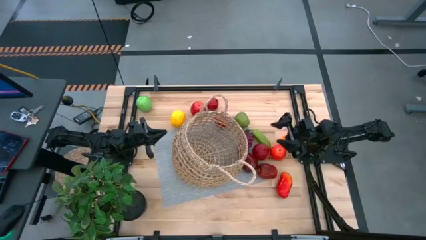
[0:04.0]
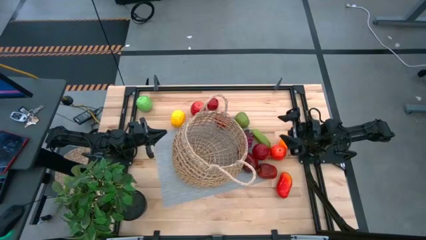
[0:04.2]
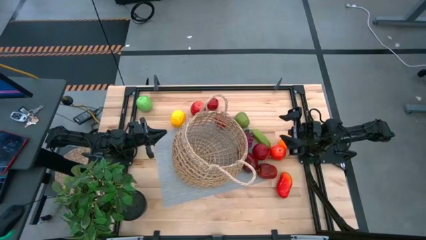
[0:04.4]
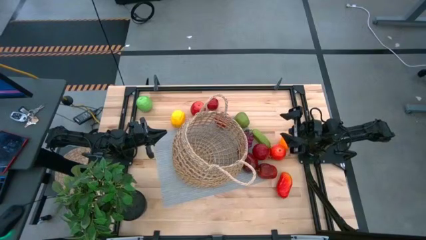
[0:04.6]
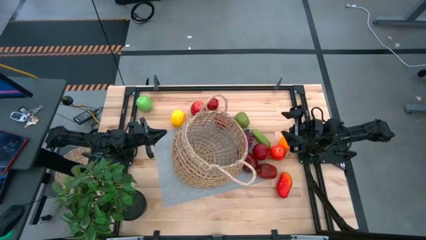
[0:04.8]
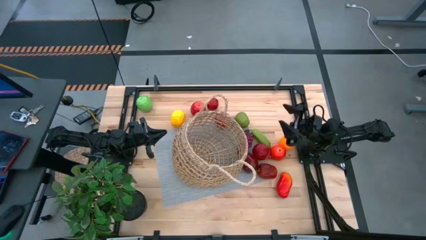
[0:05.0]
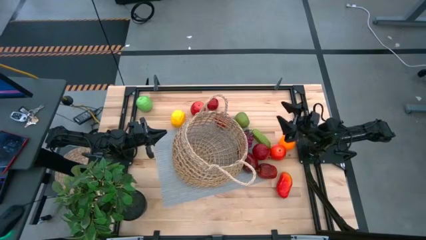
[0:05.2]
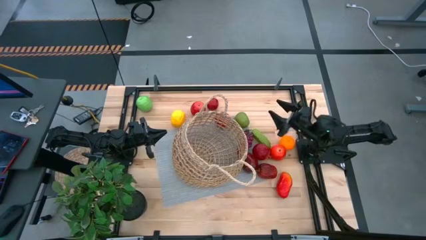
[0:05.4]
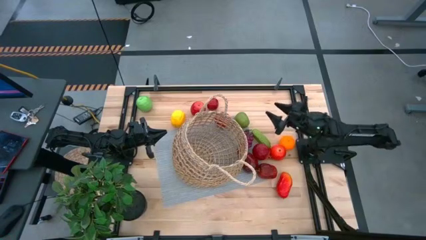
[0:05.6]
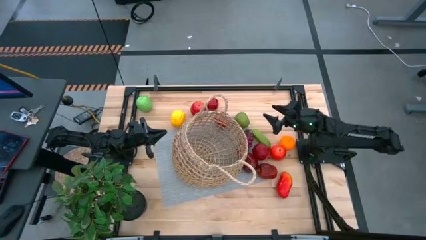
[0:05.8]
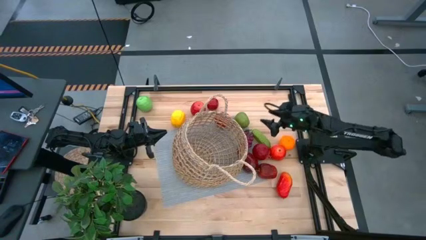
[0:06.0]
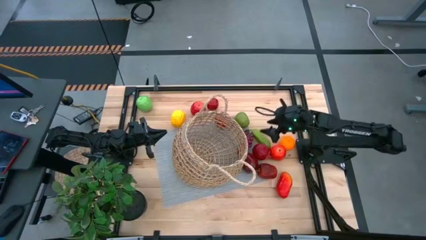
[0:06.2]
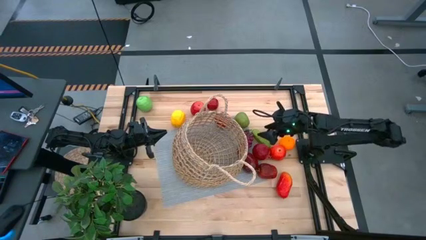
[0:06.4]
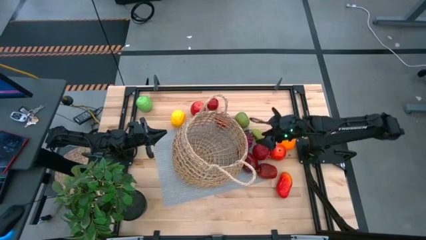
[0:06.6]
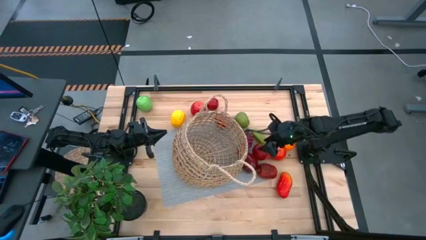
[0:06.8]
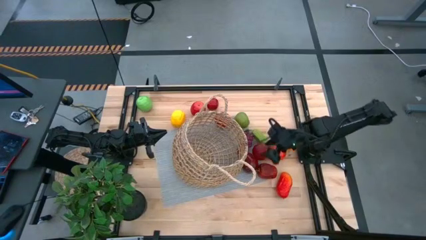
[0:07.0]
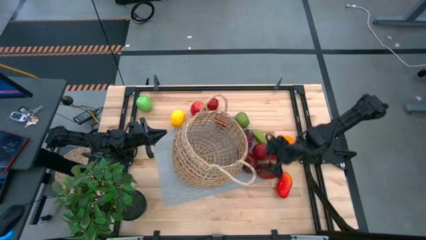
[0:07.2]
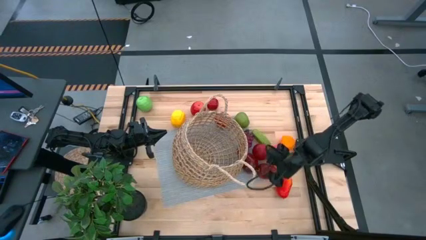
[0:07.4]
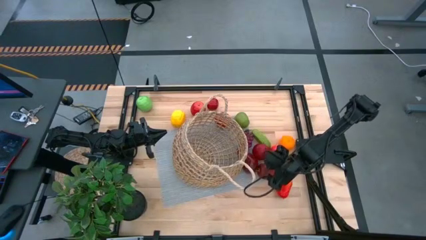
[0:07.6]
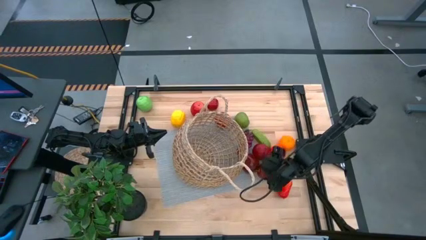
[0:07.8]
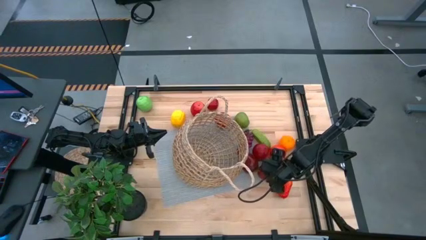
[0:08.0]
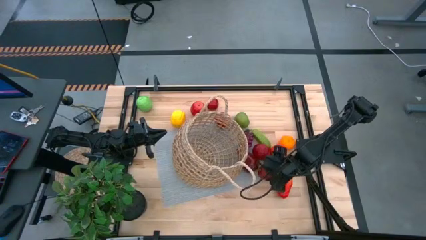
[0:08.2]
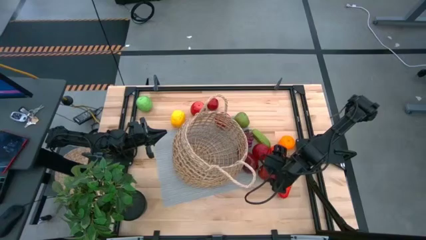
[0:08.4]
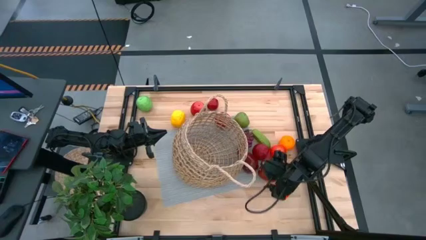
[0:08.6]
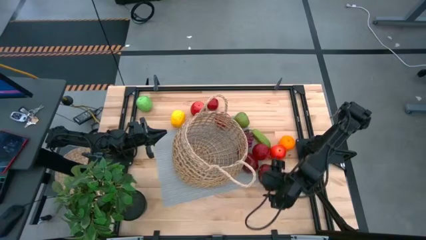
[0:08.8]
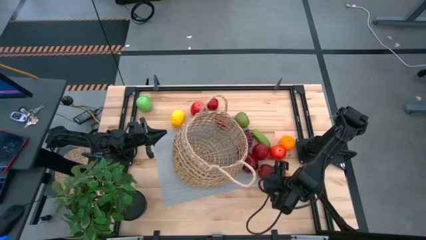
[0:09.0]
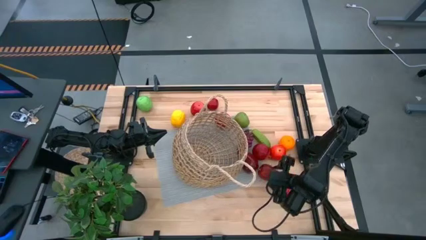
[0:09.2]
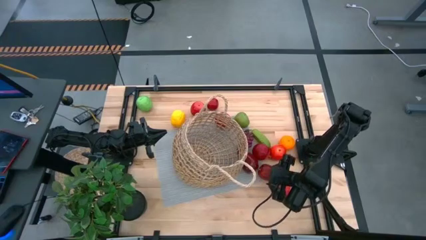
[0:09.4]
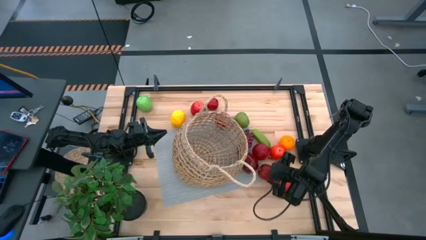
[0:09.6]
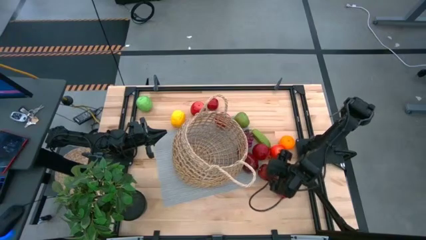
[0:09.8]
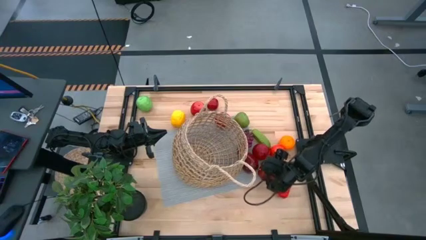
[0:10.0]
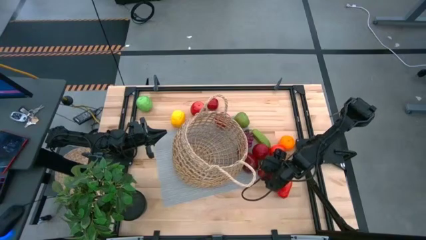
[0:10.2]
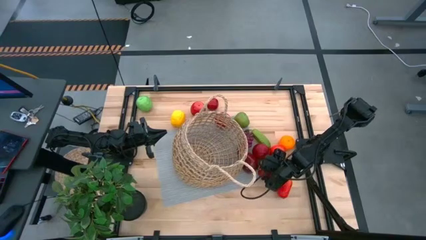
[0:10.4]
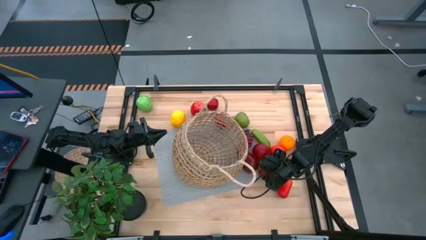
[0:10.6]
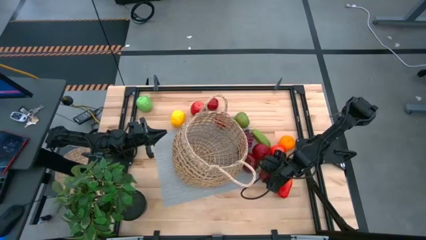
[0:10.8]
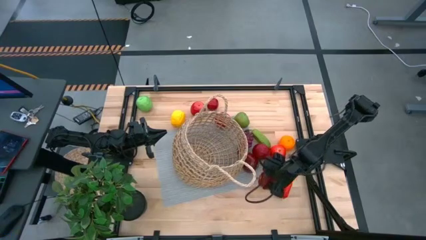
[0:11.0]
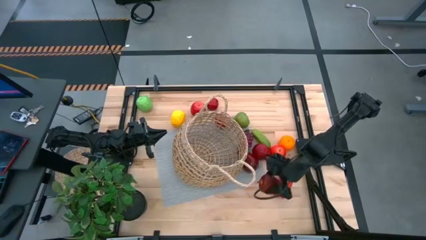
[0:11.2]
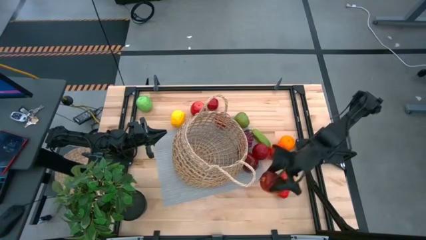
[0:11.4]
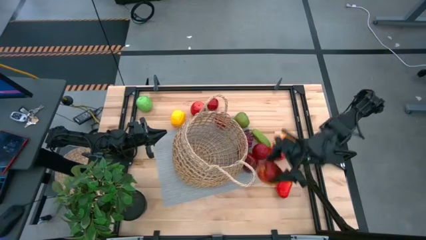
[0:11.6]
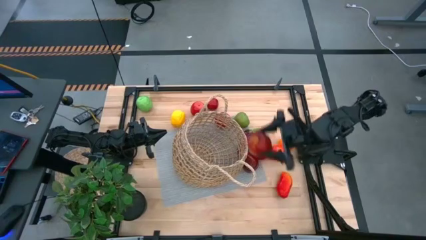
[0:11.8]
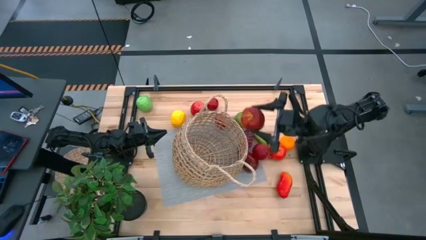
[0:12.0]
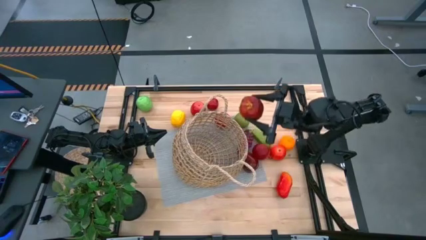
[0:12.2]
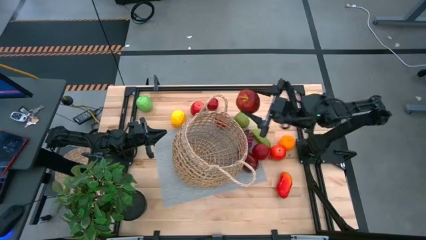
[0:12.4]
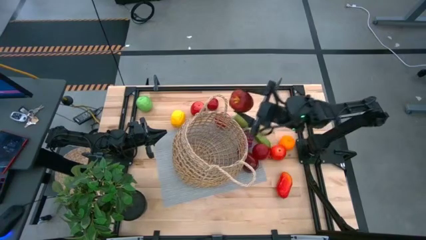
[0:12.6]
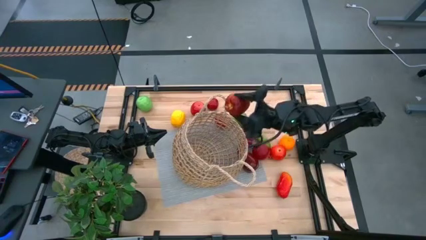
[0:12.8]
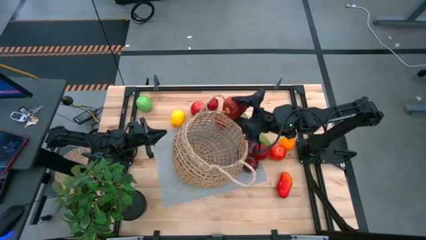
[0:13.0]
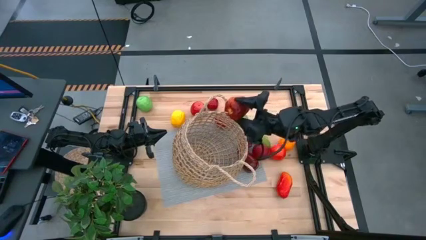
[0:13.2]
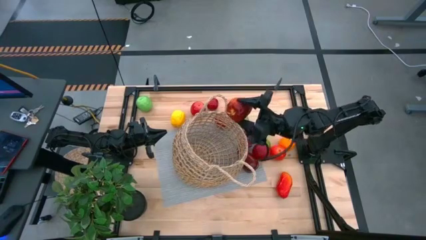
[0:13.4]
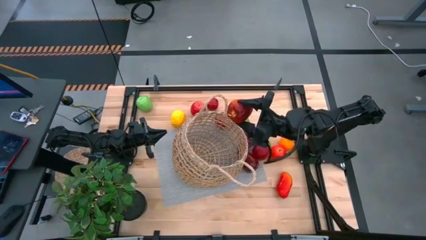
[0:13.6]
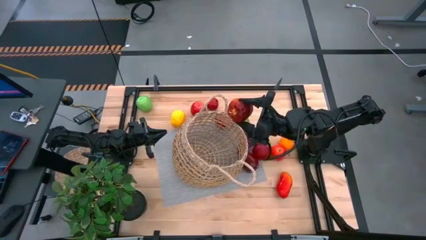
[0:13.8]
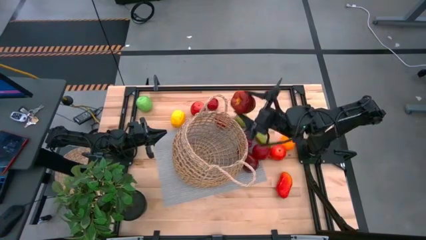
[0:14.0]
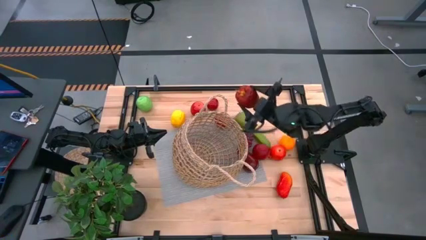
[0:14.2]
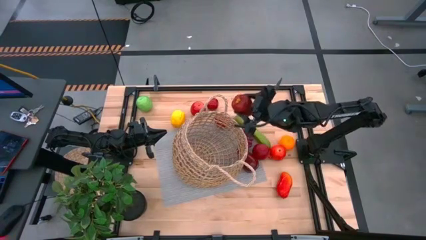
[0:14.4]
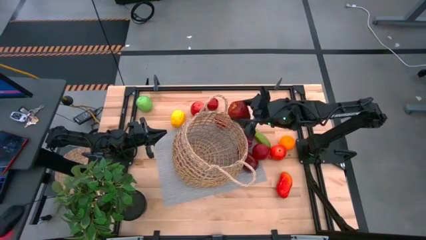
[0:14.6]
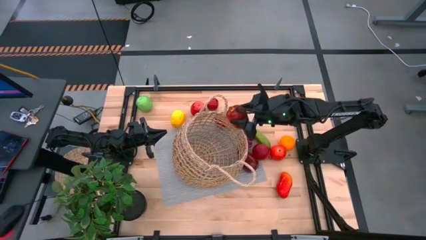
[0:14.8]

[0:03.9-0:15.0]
Task: Build produce basket
Put the red apple into the basket

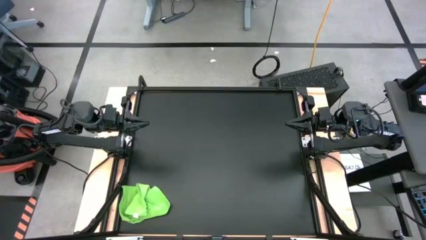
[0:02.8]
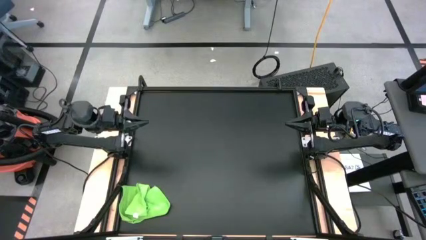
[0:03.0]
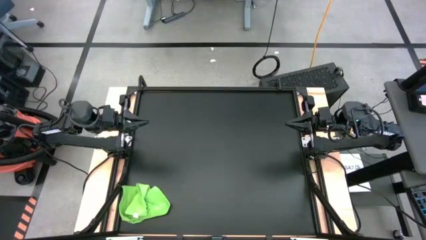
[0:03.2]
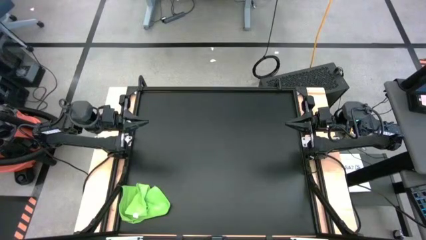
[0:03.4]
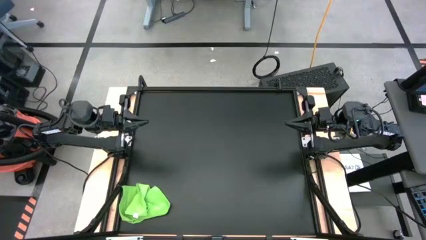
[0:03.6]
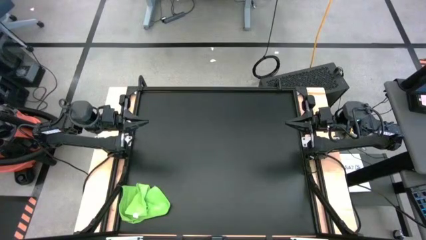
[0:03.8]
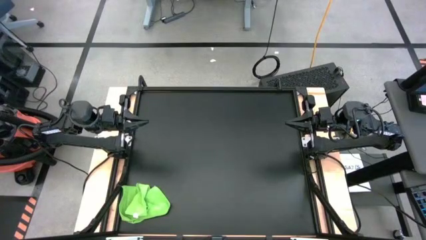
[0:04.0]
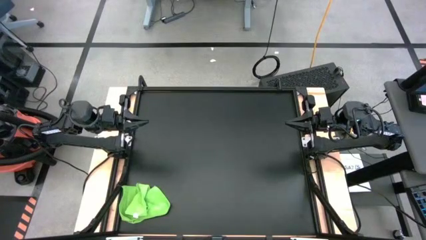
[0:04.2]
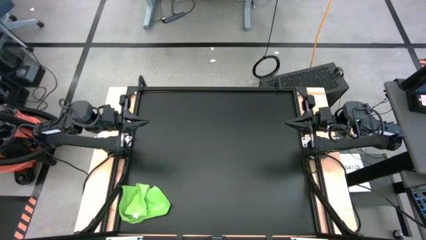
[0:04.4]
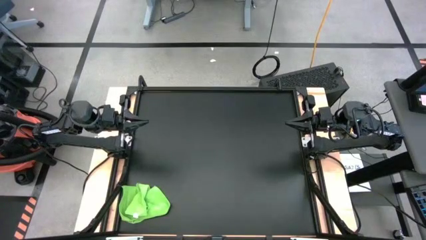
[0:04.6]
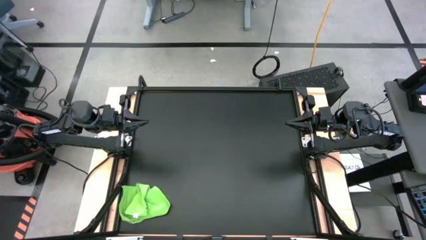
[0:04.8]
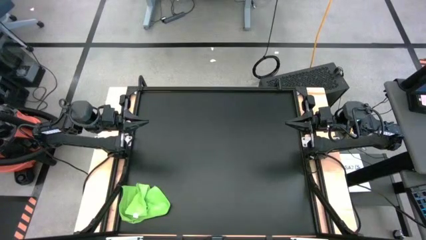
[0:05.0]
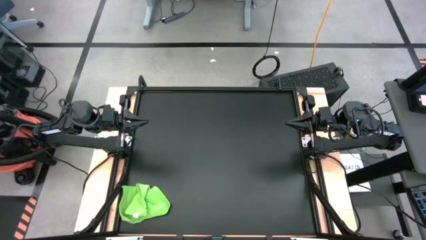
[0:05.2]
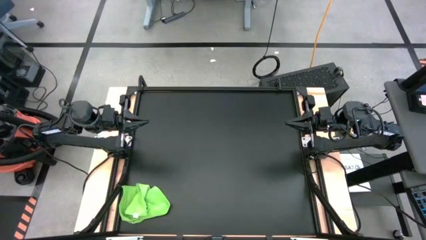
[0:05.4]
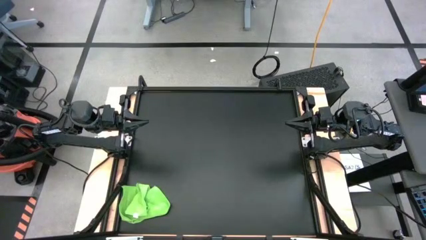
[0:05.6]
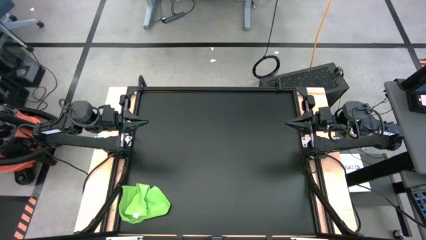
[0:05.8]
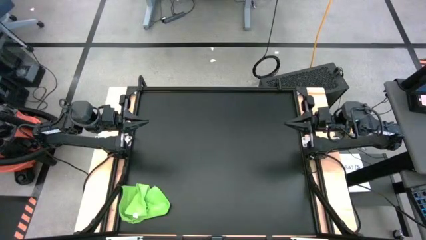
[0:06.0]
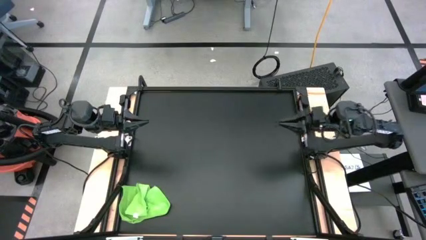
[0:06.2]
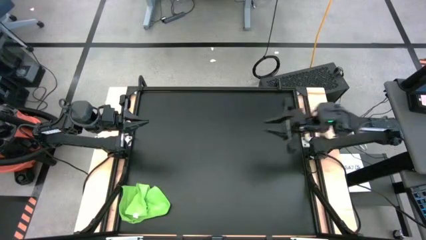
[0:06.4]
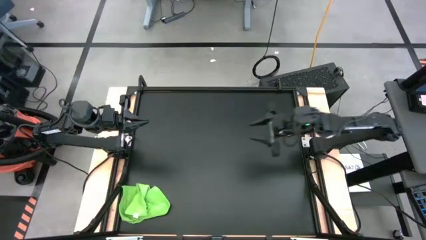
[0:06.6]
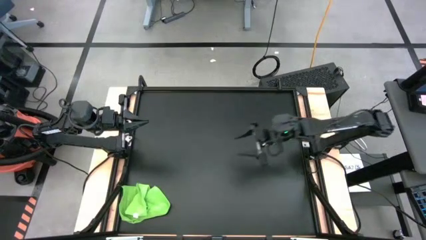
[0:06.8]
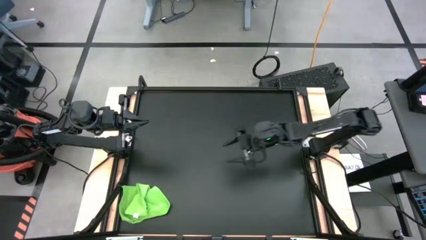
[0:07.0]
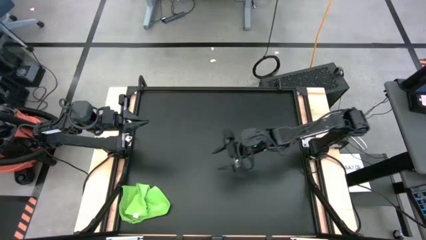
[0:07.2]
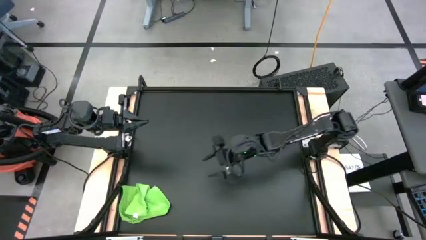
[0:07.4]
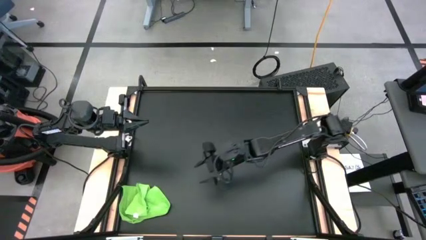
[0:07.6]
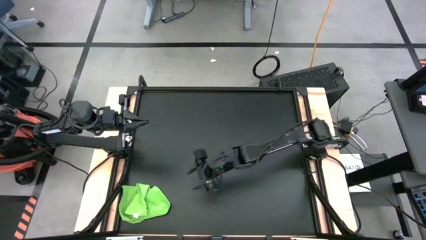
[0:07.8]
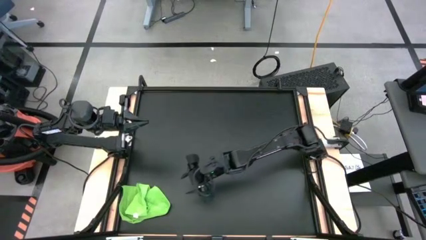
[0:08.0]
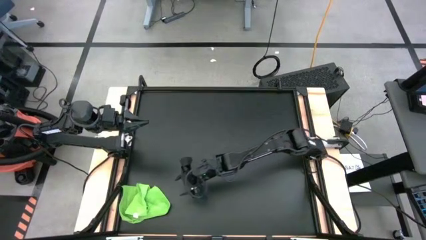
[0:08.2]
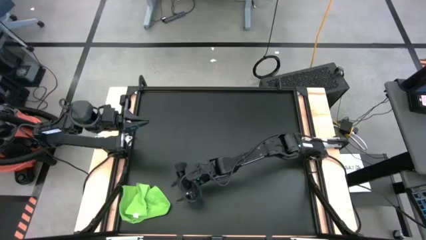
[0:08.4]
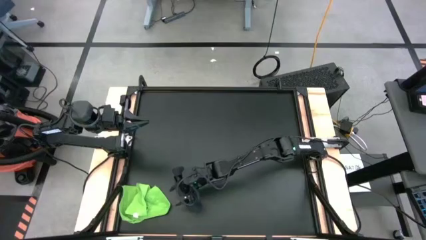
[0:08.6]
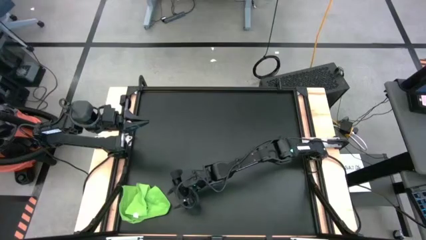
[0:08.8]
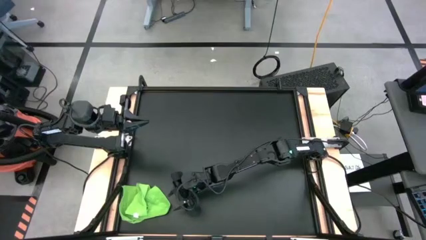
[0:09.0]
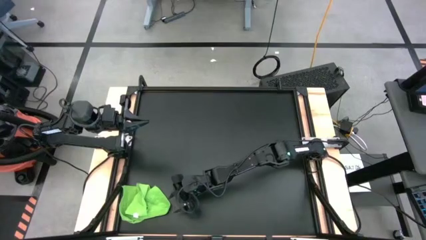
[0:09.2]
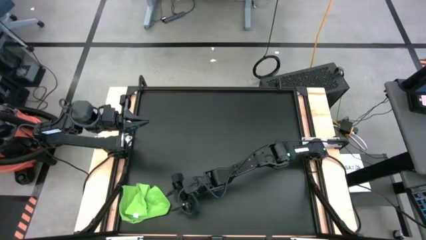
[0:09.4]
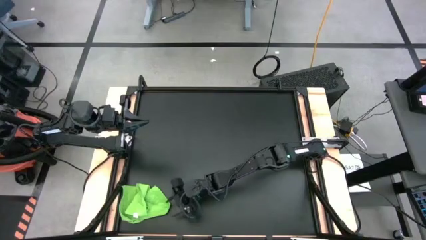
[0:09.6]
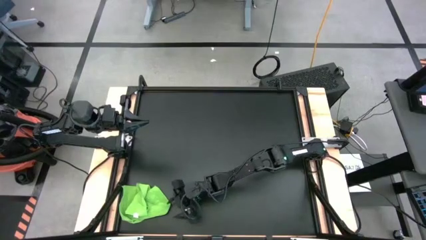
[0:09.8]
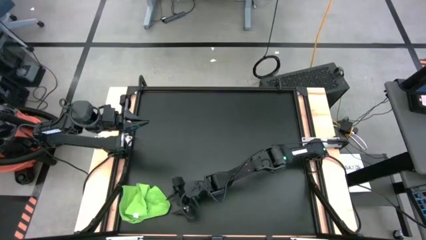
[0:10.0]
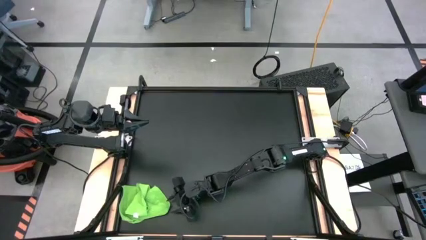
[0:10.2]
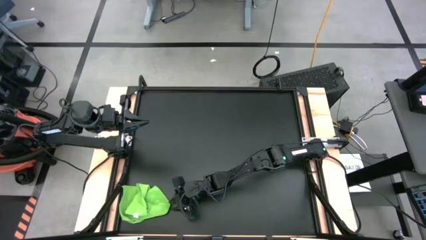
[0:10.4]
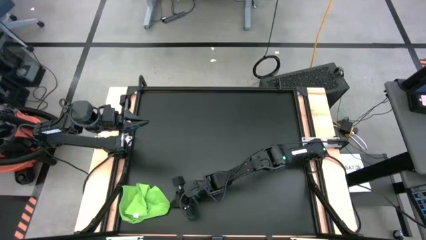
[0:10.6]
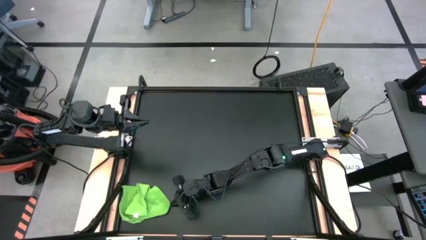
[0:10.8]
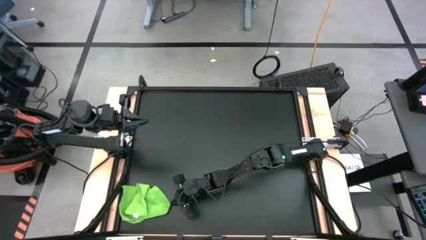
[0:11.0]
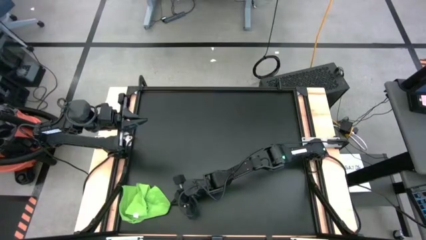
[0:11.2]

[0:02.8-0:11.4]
Task: Roll towel into tight, uniform cylinder
Fold the green towel
